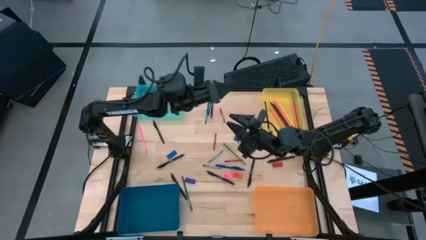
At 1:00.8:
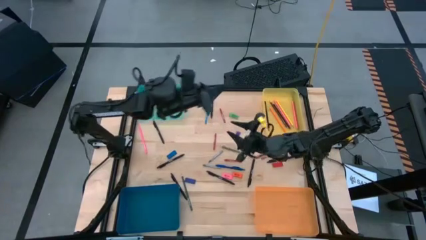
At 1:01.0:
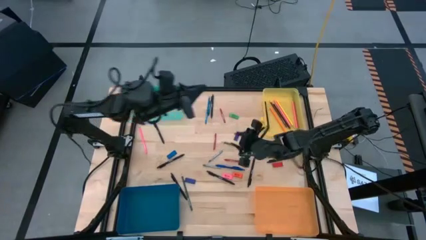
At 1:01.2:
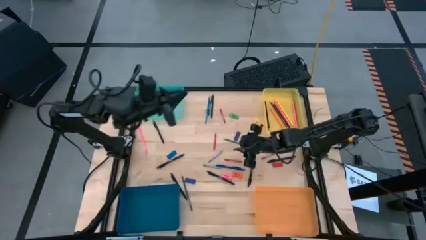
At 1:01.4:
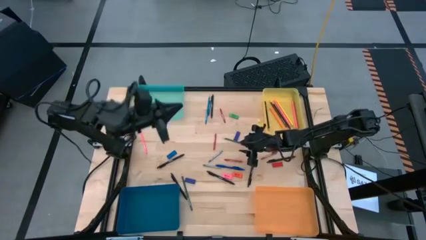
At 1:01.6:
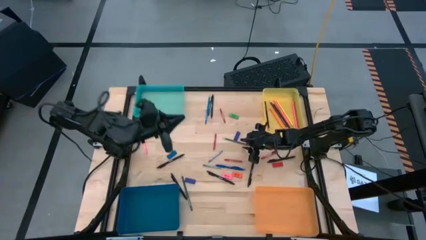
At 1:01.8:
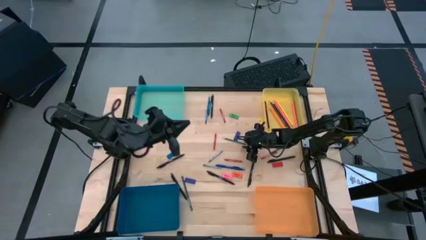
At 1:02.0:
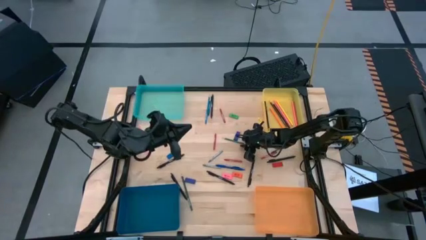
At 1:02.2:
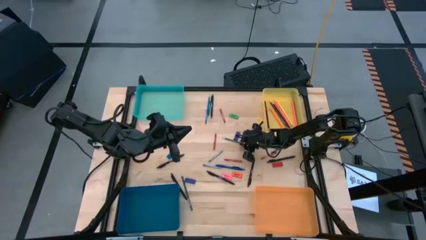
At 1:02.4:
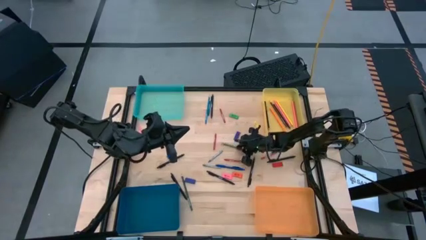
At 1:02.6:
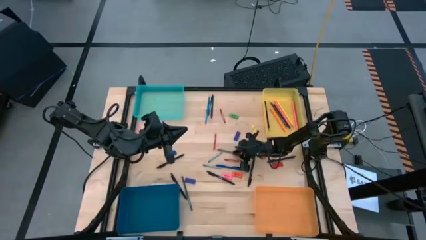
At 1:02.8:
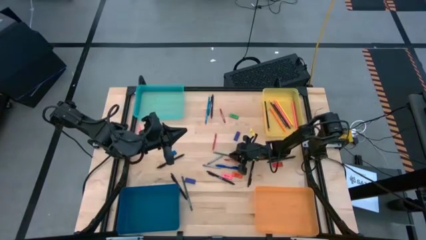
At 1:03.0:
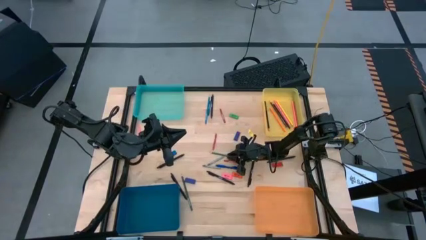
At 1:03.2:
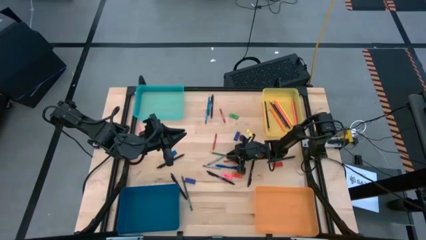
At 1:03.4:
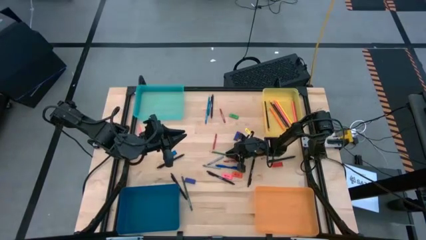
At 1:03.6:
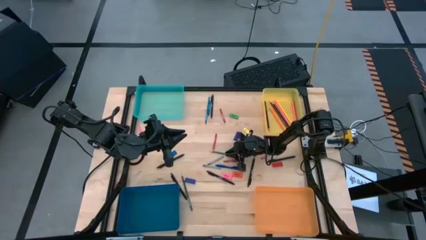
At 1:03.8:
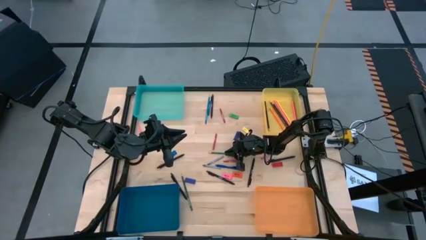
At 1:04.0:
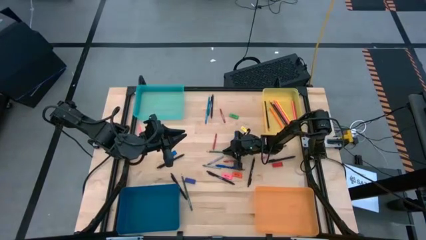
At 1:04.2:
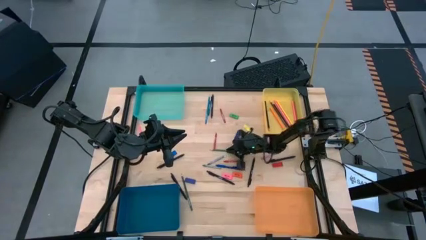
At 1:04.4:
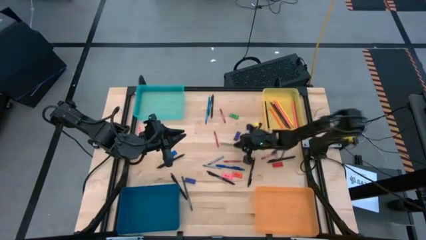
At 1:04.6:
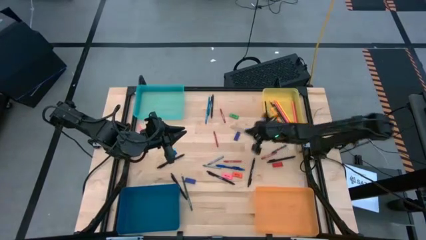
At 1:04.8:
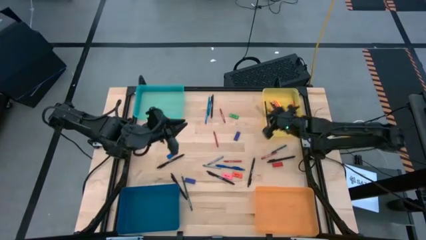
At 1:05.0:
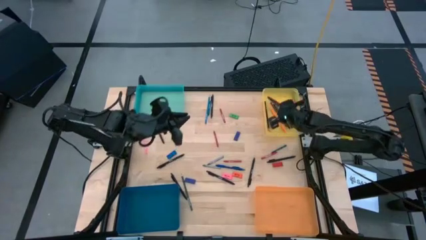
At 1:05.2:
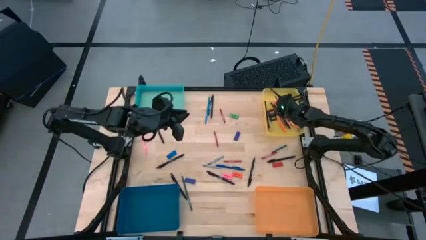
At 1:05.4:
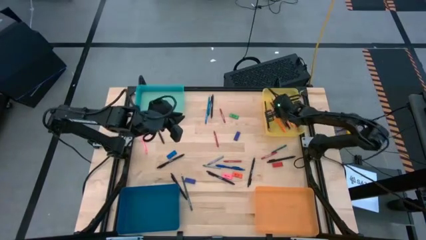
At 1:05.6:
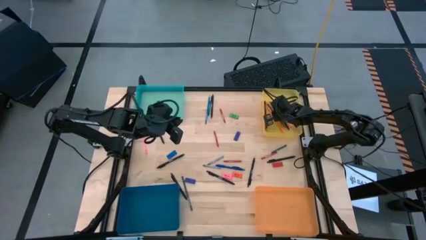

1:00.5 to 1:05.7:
Task: Sort crayons/erasers/pens/pencils in bins
Put the green pencil into the yellow bin

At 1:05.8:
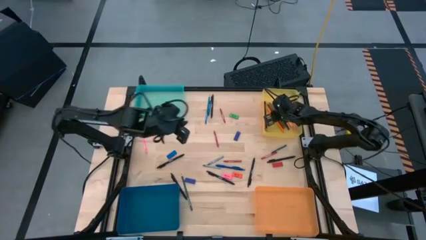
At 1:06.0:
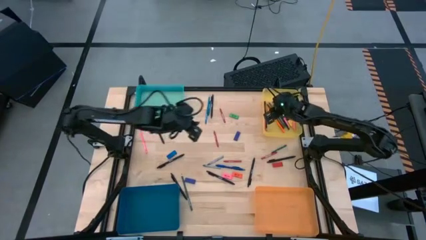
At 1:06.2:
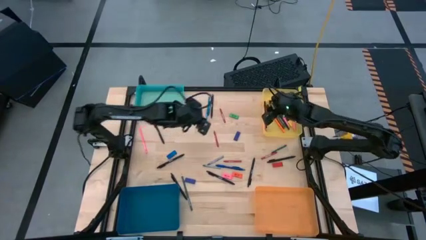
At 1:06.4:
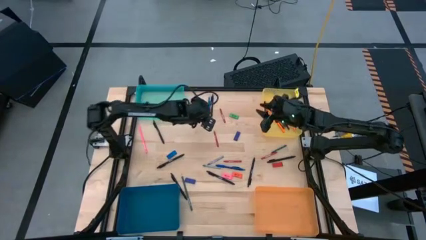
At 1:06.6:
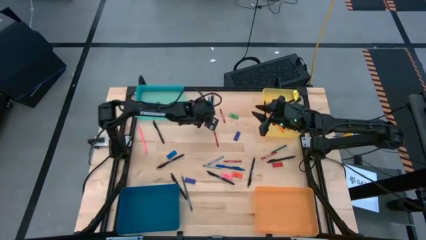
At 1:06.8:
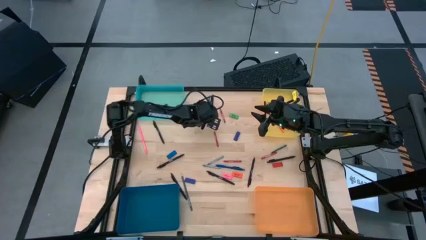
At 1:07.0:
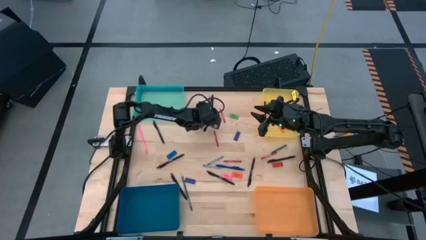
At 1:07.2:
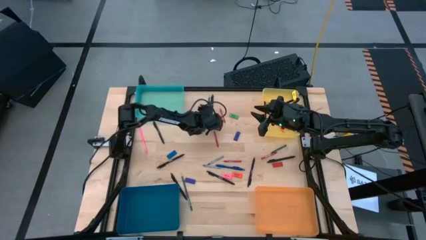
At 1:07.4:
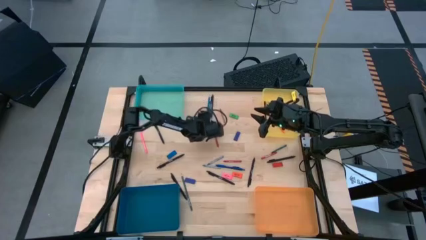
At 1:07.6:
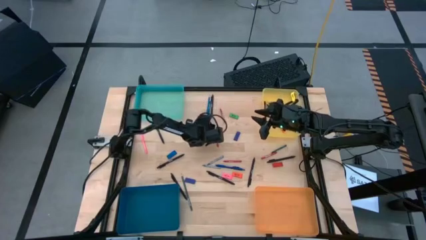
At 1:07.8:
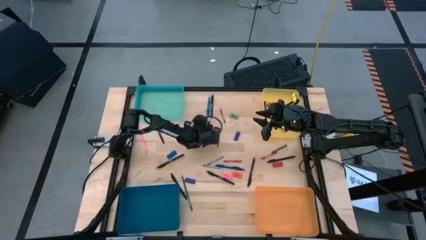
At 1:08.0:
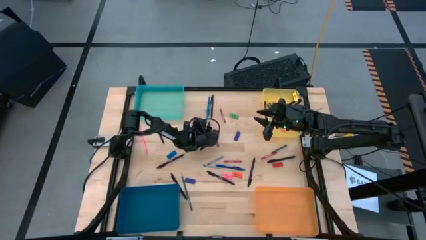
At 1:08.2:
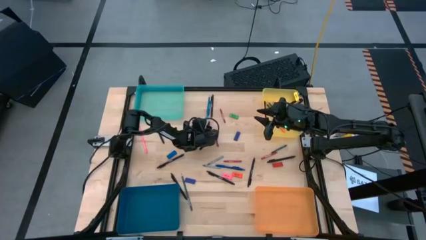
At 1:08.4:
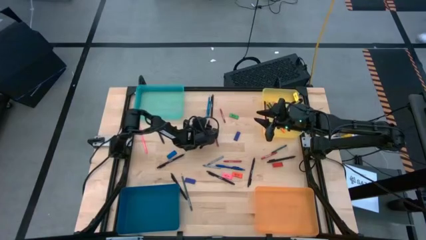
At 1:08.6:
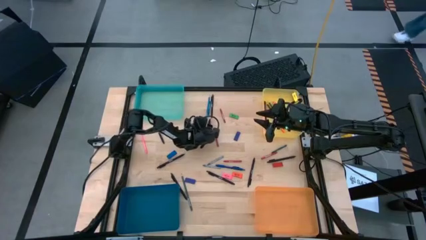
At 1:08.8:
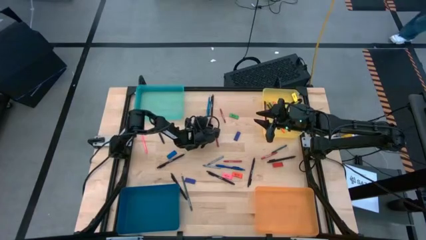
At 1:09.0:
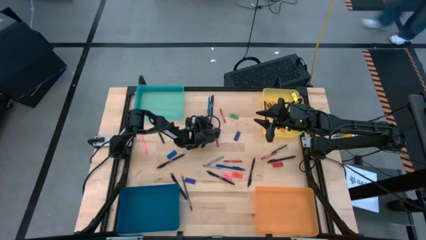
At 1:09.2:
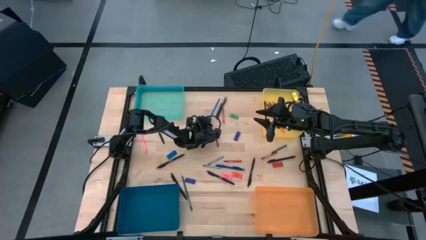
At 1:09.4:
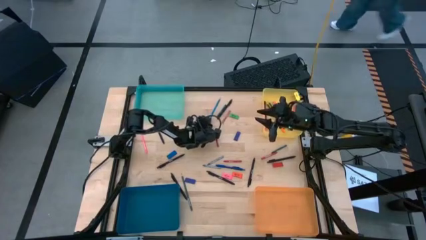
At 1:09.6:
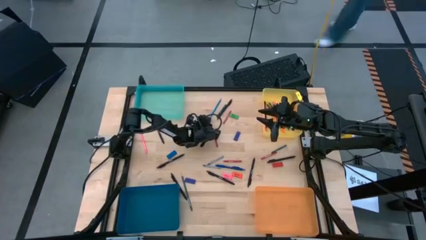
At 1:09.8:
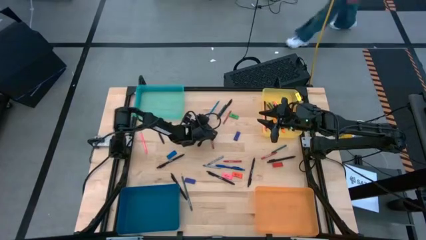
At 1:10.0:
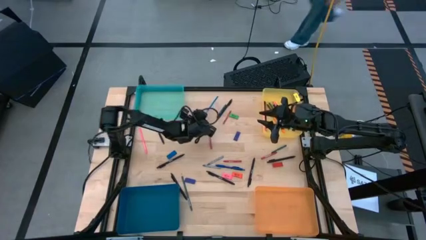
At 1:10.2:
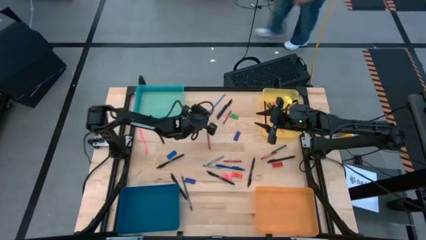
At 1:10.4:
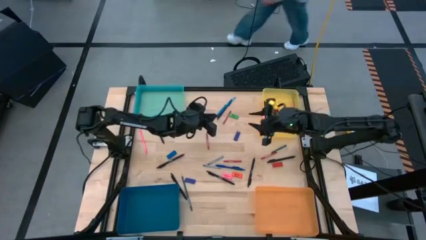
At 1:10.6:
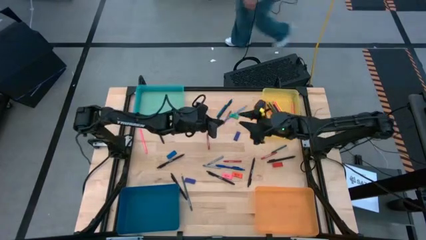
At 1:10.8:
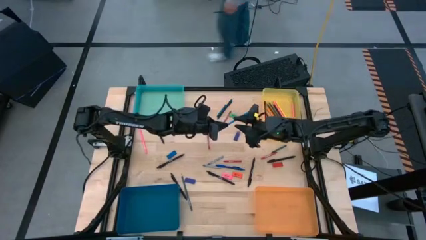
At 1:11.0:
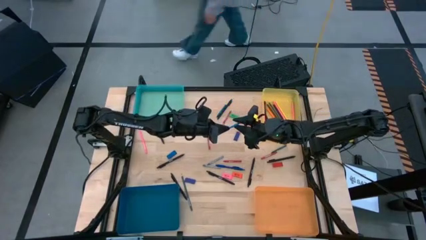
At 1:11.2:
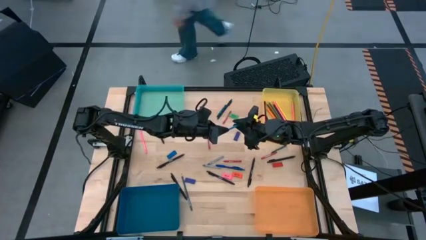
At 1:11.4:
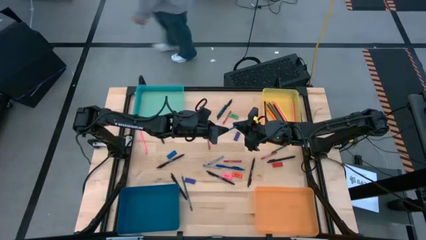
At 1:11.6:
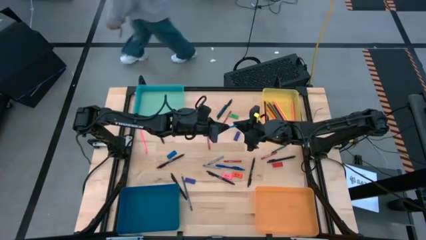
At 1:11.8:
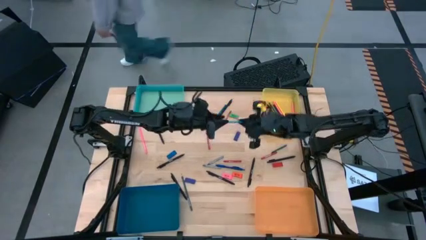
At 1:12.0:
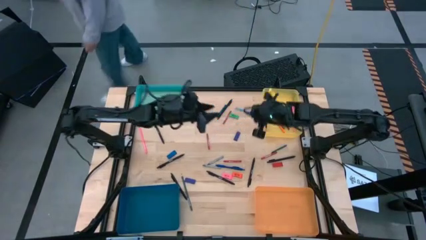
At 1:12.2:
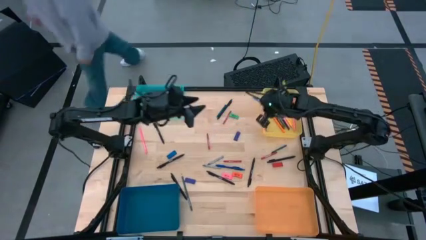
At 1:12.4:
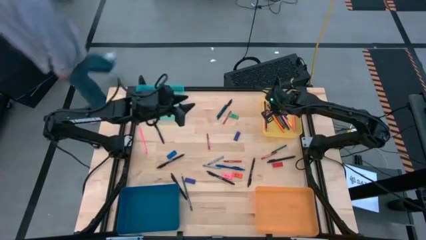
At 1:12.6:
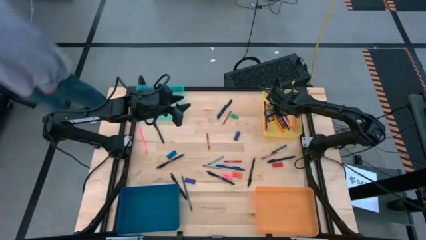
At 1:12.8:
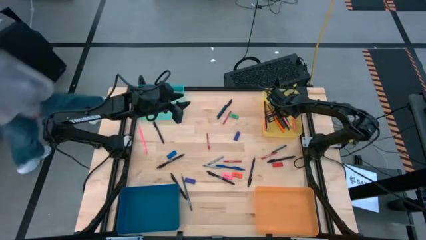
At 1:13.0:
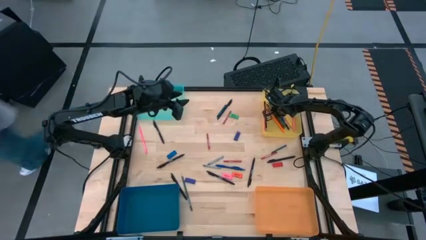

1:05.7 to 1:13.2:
Put the light blue pencil into the yellow bin

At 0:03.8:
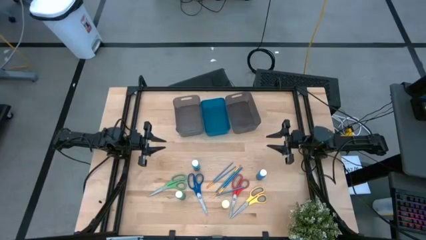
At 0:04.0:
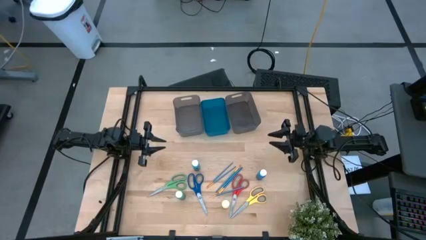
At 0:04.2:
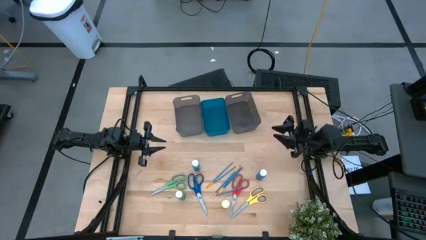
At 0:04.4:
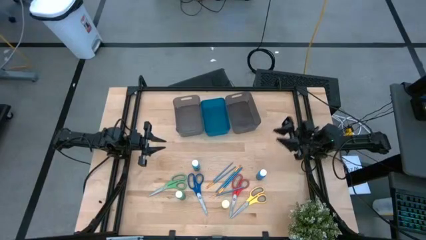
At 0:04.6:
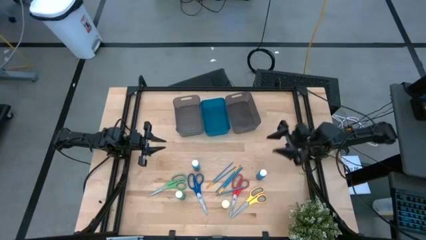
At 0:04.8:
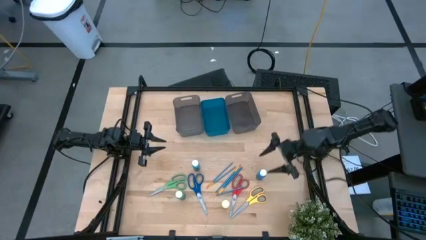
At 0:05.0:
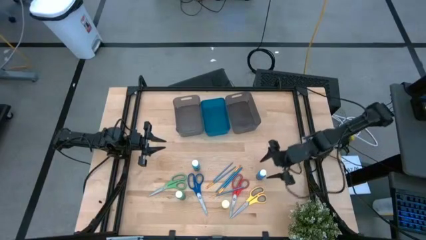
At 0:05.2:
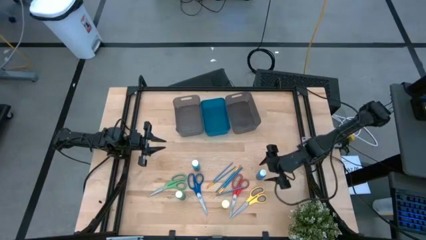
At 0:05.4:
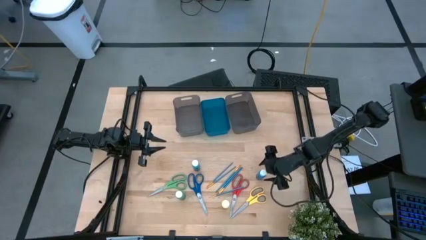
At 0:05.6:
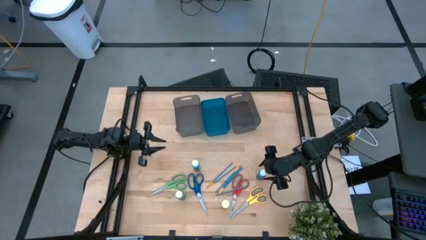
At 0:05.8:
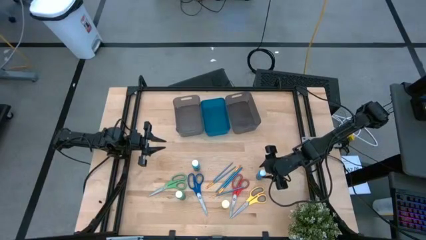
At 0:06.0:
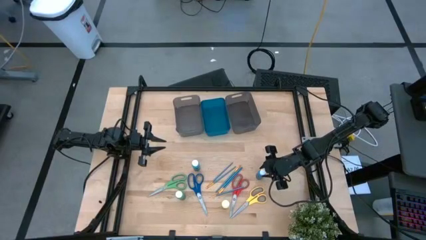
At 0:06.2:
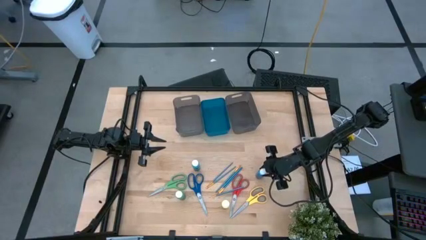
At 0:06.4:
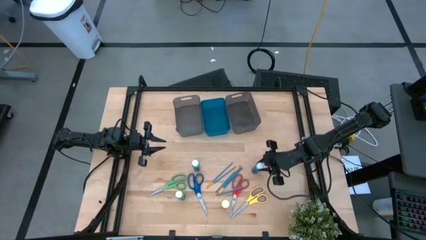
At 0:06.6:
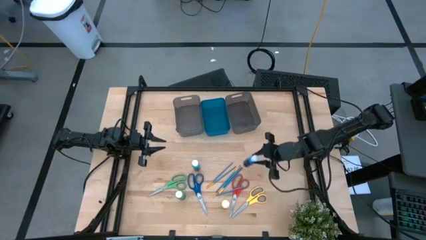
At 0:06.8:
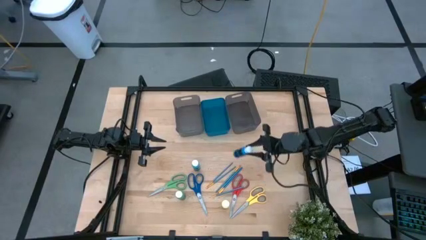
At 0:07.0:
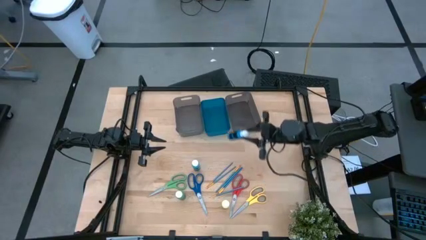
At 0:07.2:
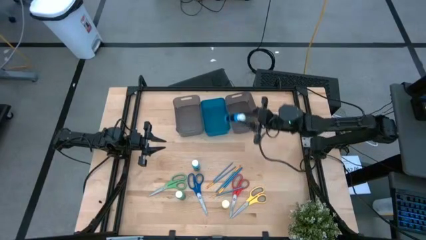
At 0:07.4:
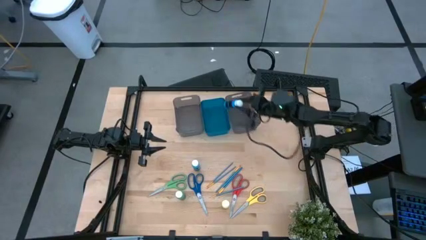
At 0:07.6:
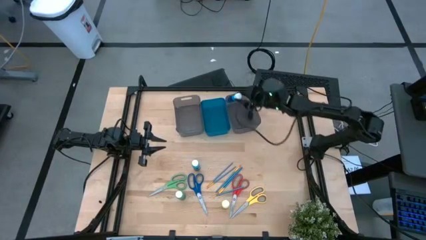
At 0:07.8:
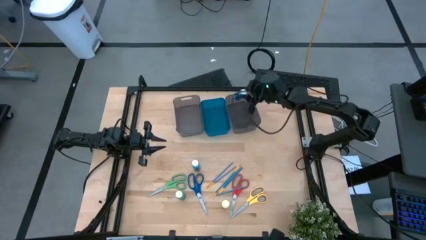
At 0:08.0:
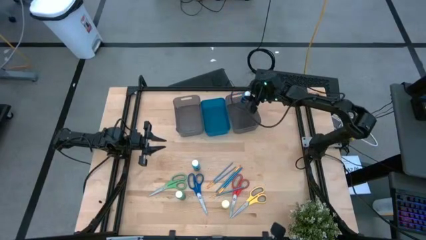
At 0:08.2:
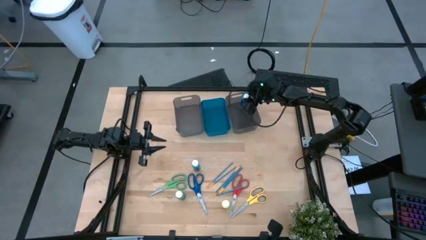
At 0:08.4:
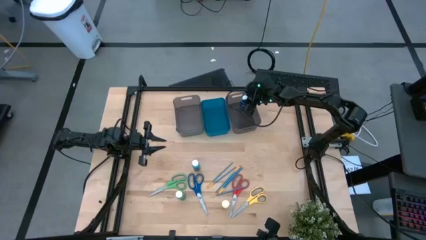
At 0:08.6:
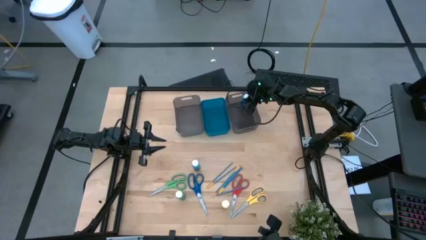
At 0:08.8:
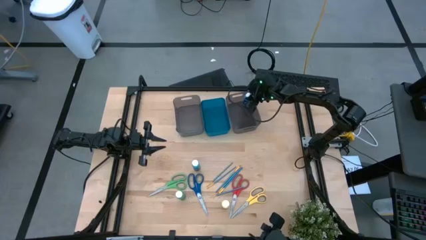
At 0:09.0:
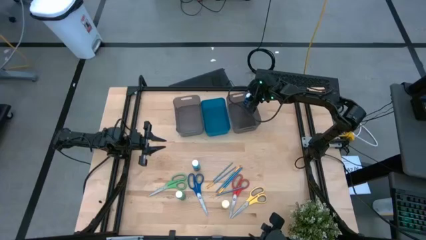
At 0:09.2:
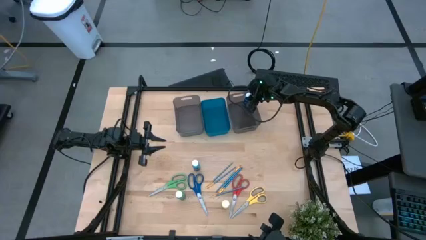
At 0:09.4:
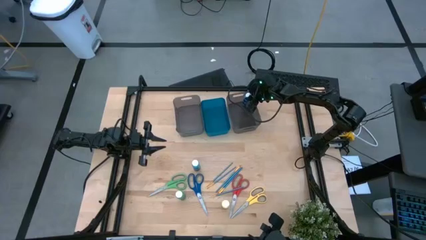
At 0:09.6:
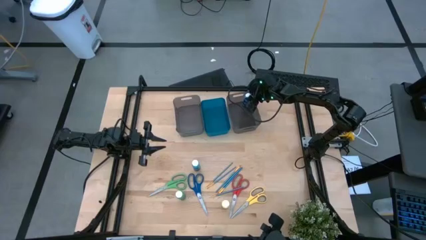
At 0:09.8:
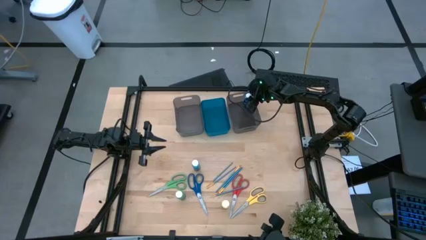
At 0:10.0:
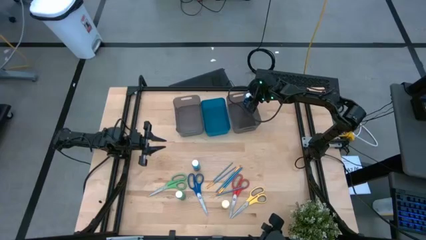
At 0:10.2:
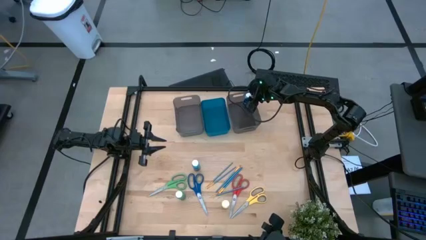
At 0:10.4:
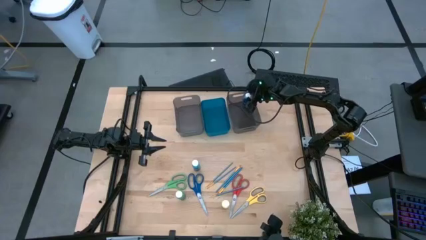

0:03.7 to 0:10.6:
Task: Pick & Place Paint Supplies
Put the blue coloring bottle into the right gray bin
